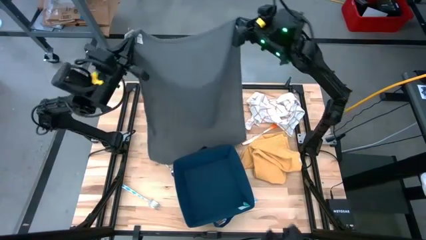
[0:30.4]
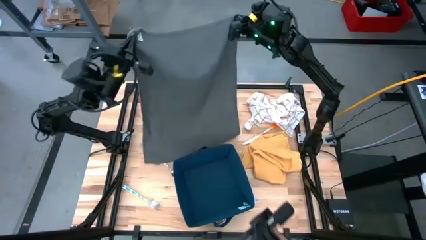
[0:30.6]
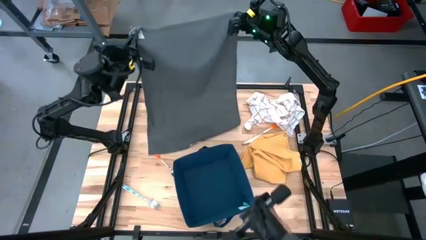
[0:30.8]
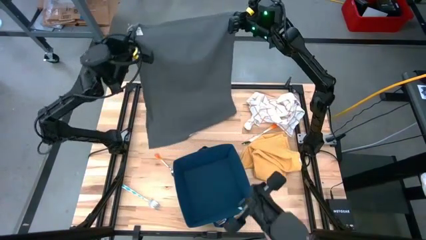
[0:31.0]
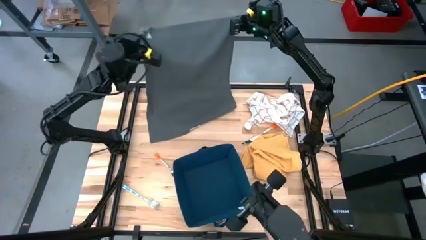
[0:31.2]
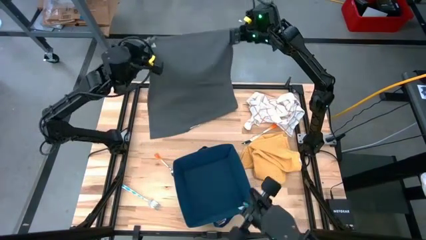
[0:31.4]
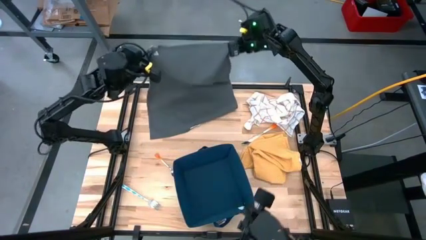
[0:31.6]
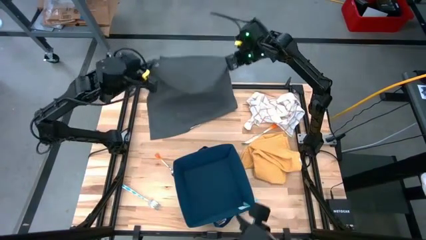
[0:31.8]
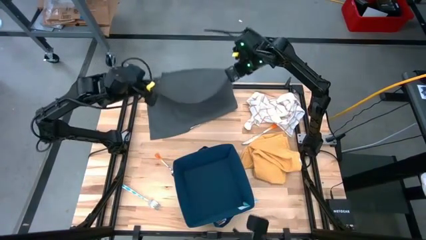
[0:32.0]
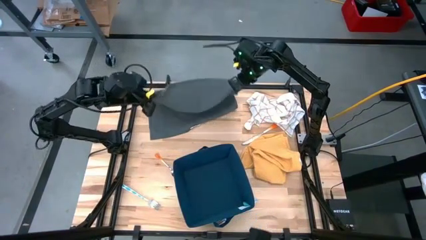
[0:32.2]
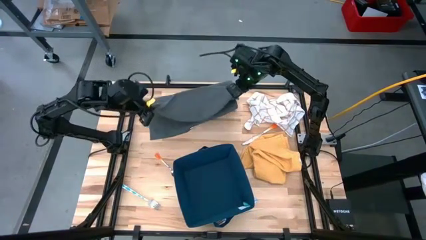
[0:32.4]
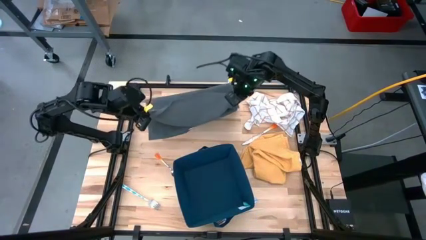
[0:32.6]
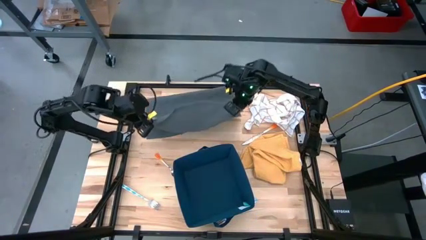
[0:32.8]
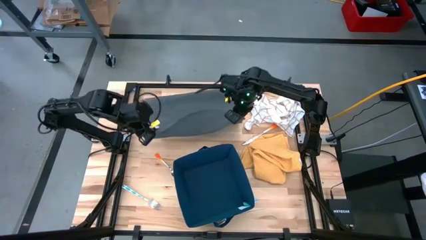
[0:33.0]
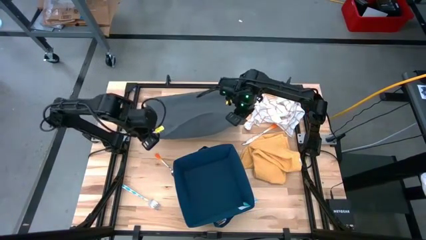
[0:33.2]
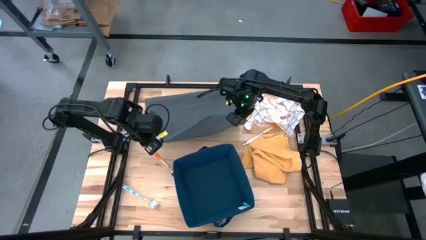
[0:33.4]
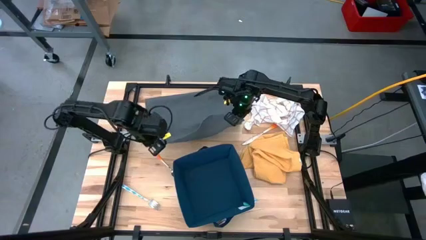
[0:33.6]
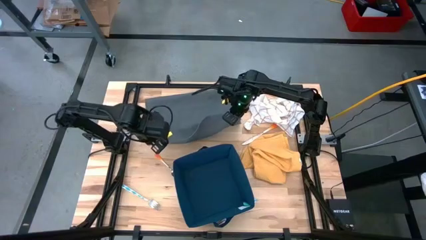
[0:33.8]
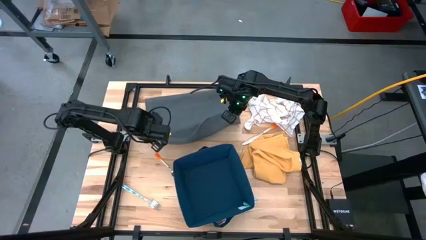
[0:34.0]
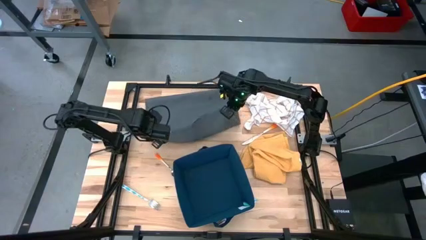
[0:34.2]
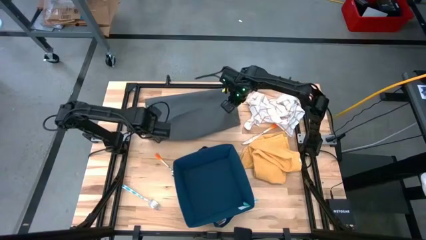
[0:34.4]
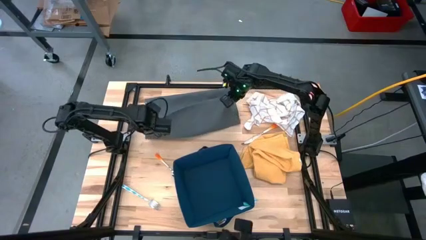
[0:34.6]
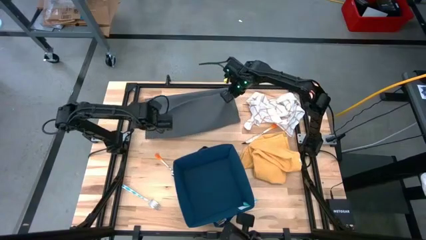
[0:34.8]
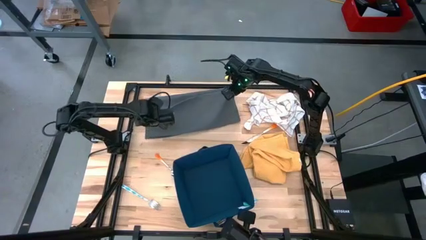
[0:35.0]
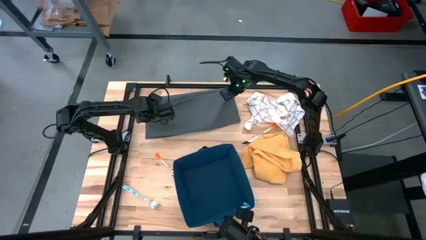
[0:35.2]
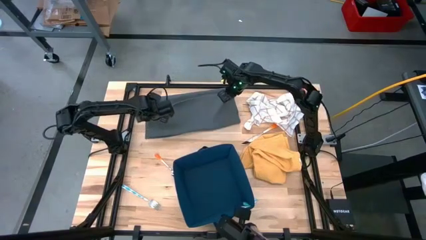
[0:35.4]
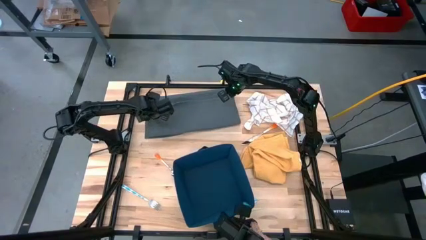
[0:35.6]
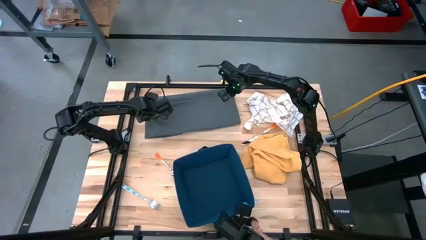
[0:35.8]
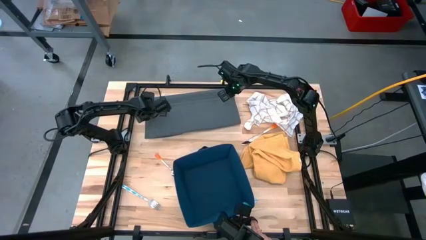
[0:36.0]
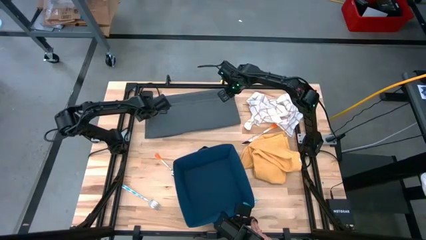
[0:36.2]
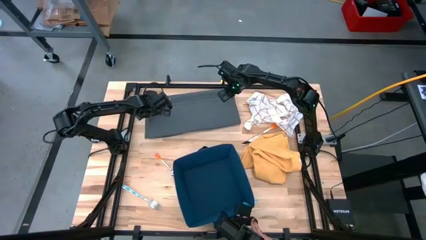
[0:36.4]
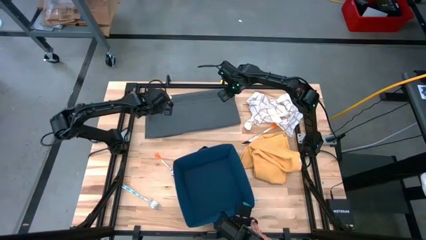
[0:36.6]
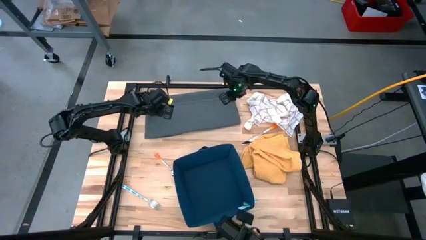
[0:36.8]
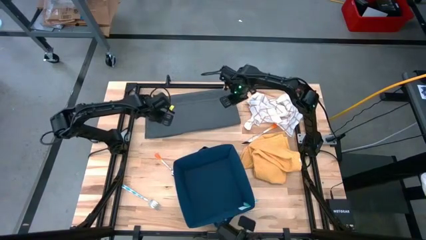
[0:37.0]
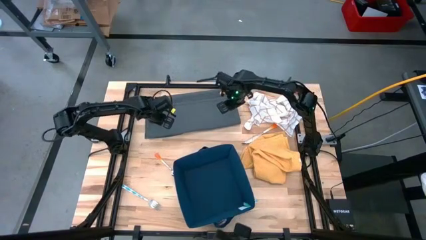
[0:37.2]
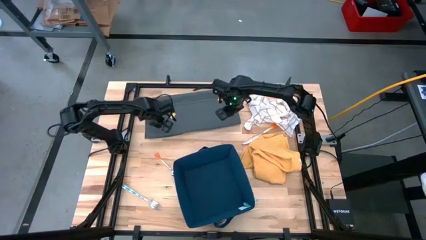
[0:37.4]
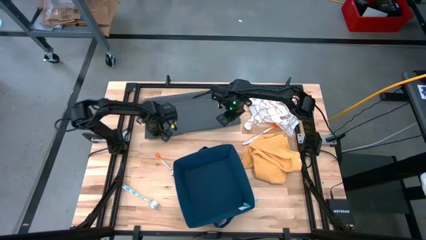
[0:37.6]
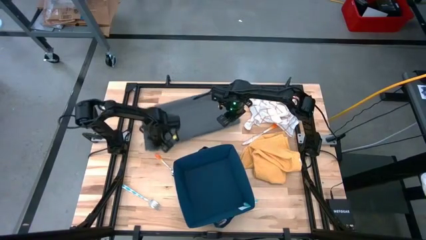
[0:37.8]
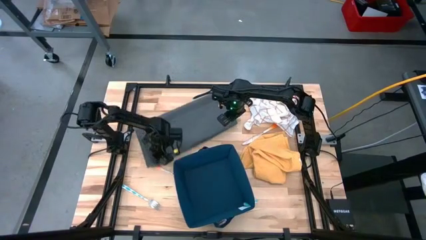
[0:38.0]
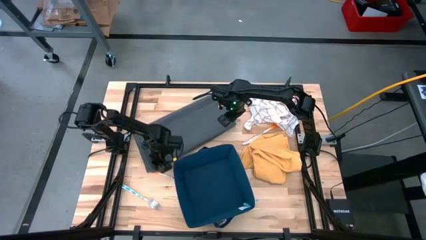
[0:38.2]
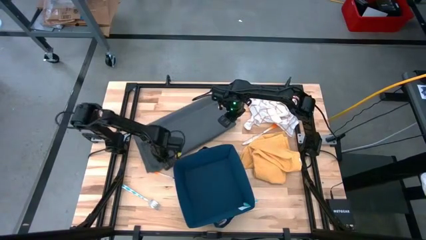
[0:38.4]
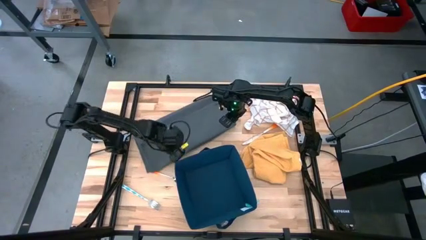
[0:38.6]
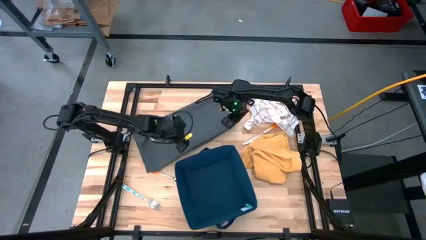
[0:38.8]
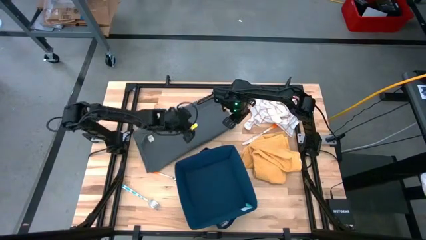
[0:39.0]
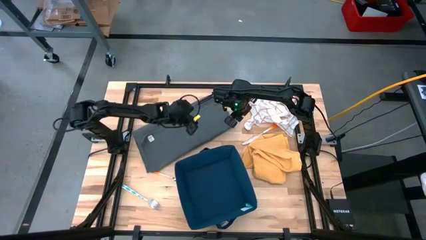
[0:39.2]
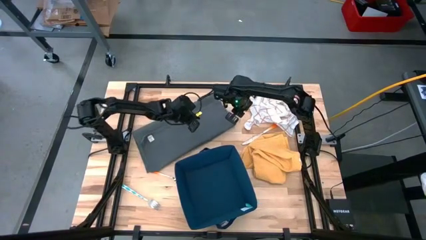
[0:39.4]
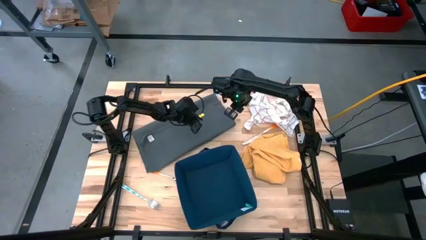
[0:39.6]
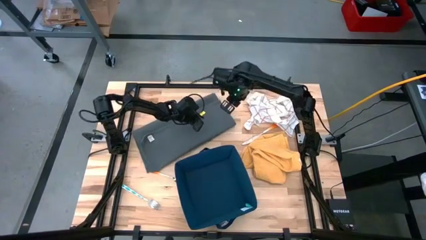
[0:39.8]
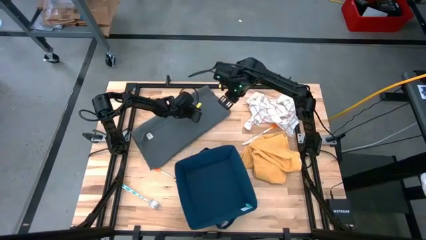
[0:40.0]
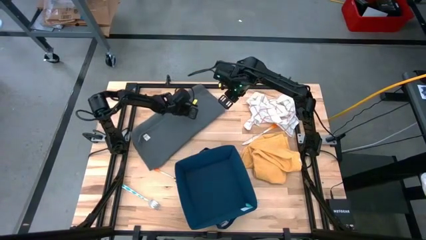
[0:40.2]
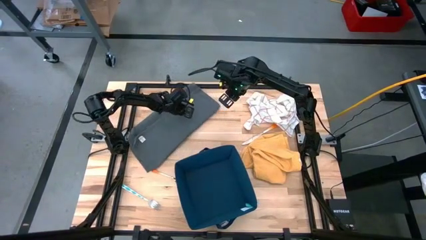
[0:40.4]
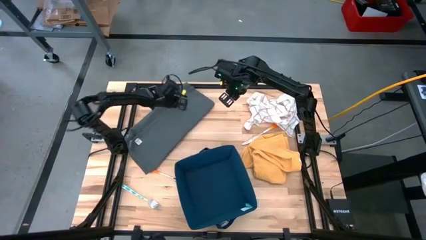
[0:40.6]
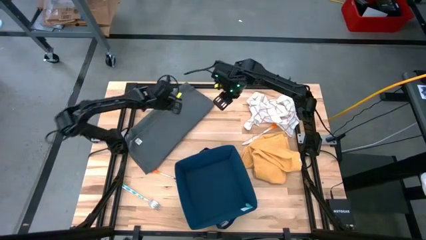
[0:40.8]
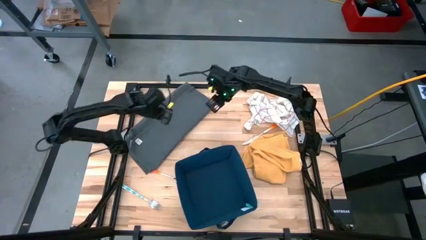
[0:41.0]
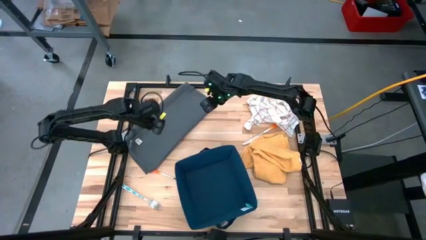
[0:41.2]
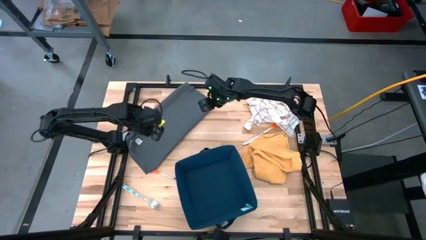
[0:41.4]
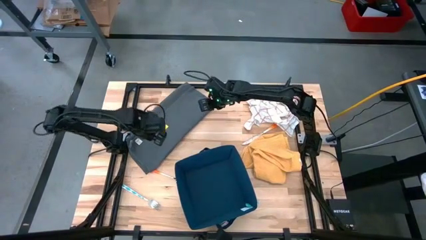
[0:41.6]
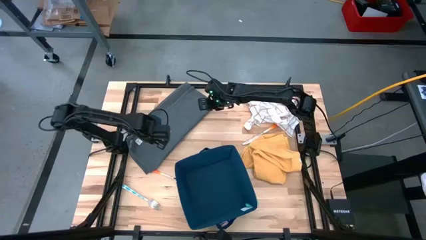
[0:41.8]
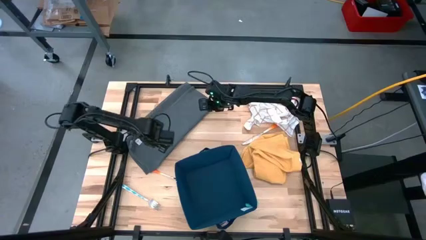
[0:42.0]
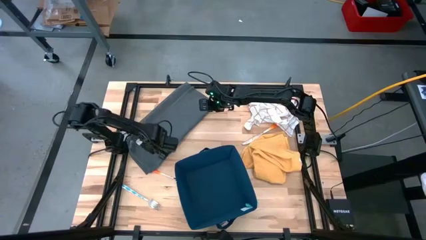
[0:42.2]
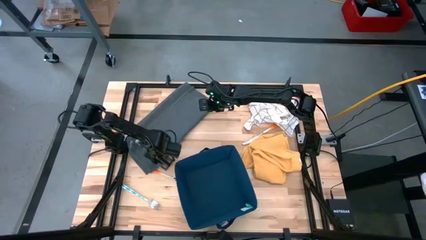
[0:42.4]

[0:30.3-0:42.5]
Task: Fold towel
Fold the gray towel

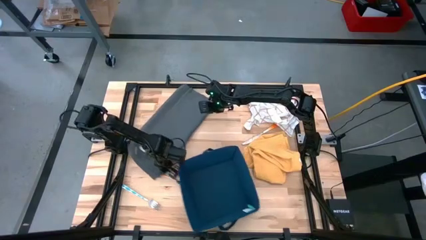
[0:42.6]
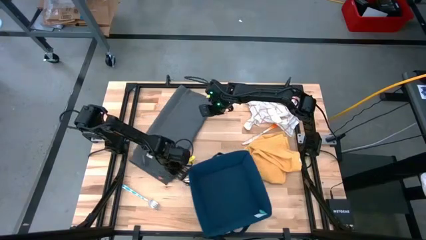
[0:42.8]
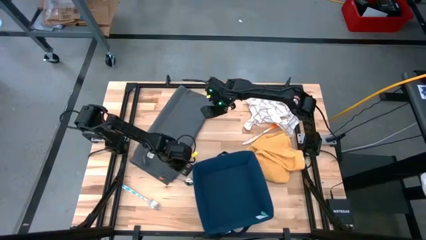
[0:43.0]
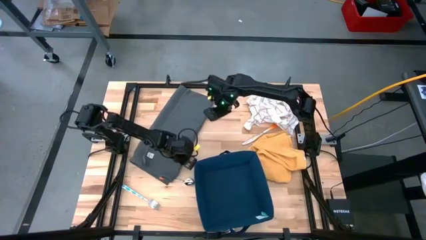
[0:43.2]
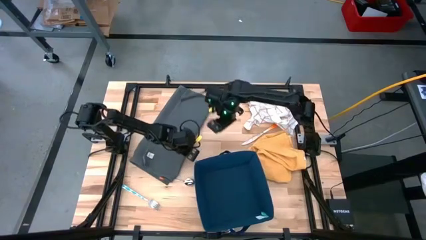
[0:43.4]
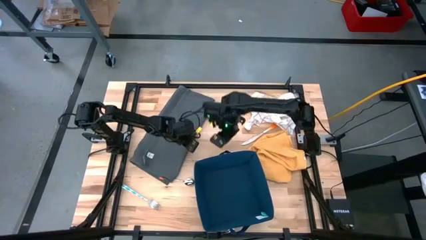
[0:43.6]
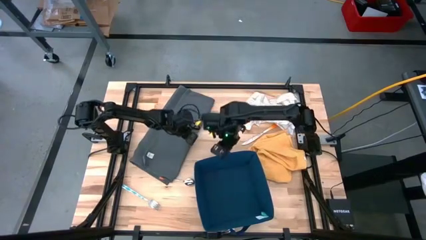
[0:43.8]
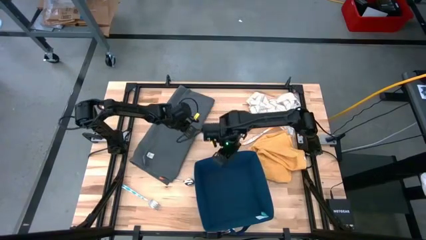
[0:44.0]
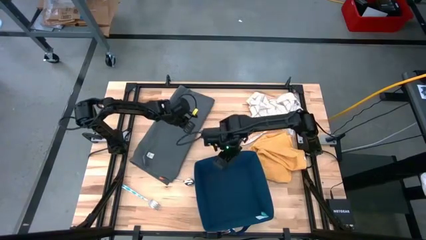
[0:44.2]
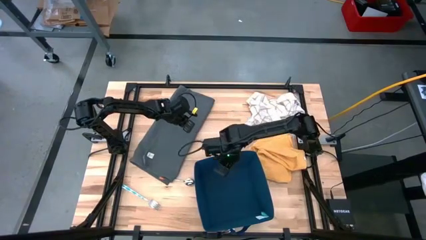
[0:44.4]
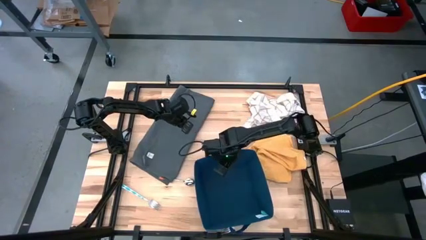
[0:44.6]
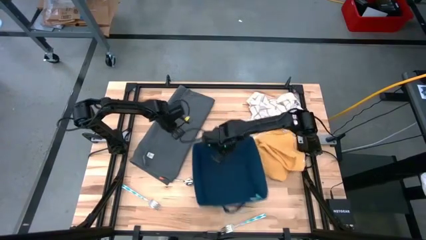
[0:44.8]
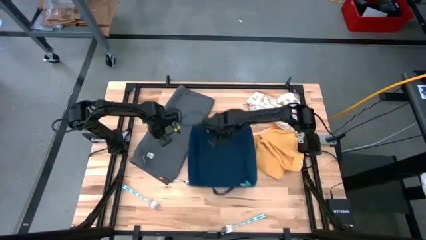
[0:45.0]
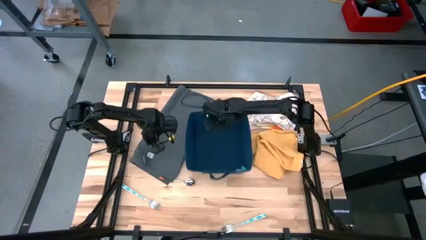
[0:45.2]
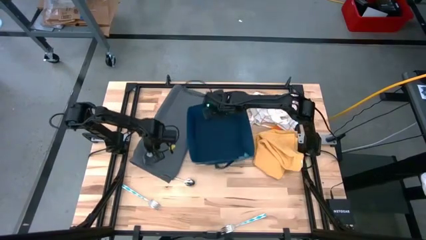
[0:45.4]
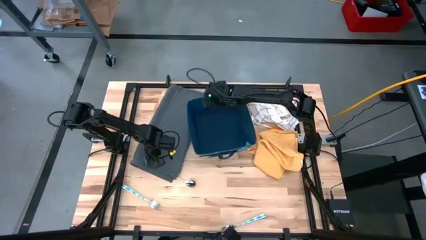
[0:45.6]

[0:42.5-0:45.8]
Adjust the blue bin
